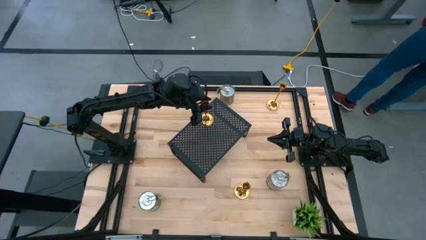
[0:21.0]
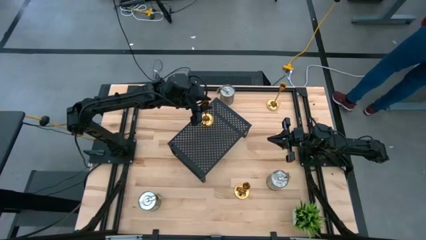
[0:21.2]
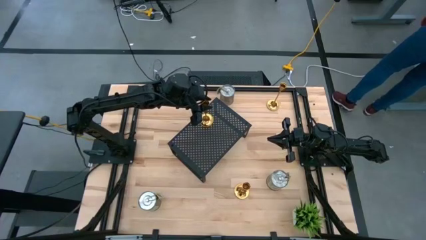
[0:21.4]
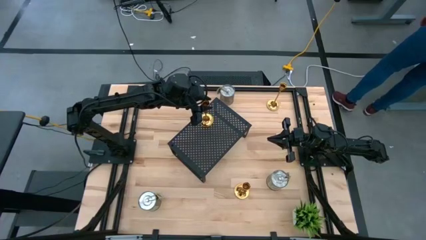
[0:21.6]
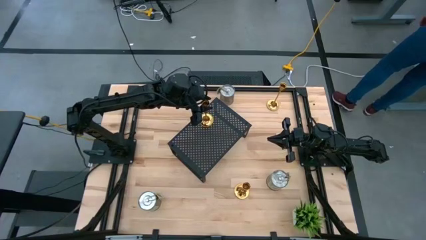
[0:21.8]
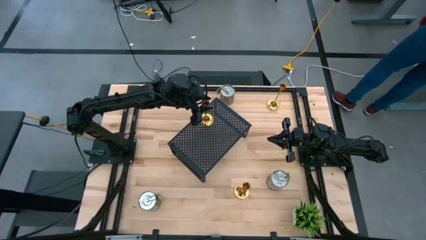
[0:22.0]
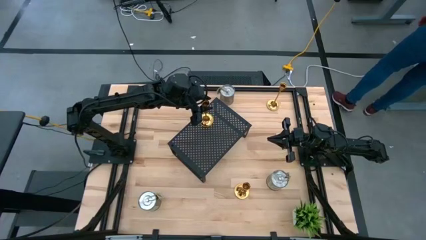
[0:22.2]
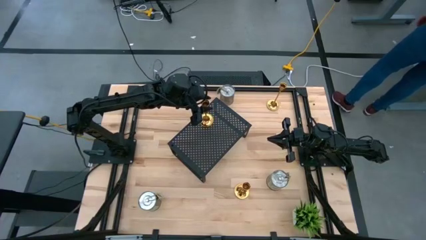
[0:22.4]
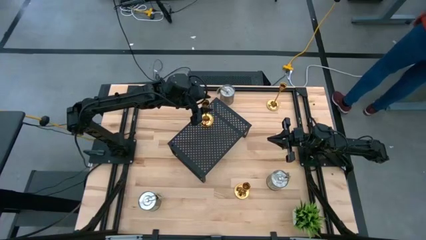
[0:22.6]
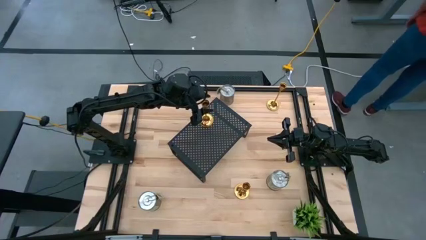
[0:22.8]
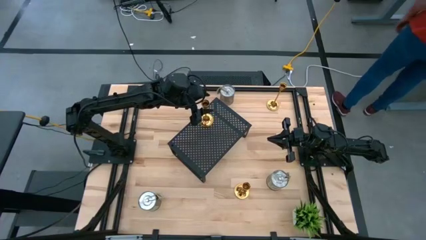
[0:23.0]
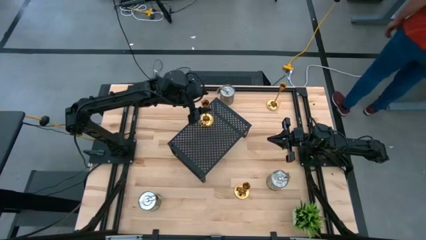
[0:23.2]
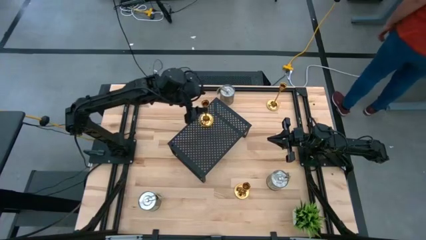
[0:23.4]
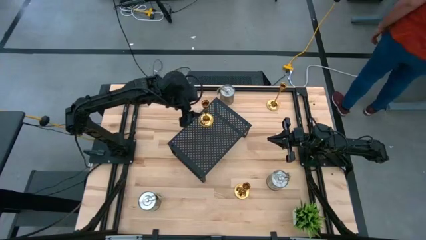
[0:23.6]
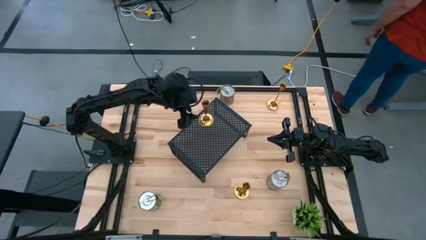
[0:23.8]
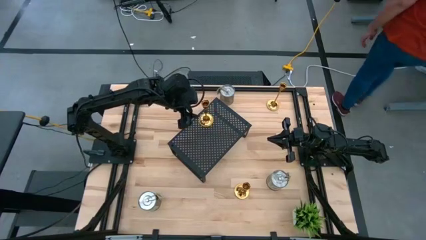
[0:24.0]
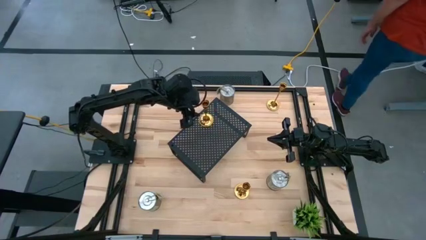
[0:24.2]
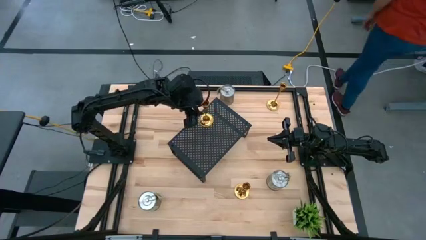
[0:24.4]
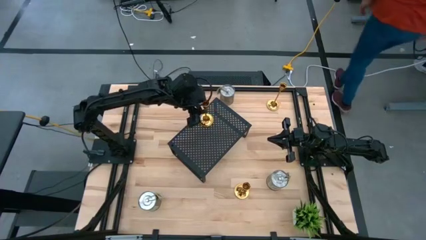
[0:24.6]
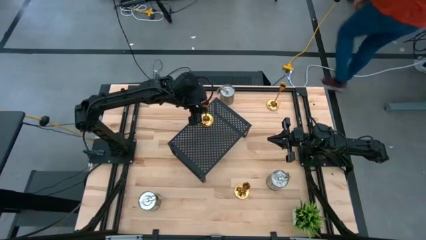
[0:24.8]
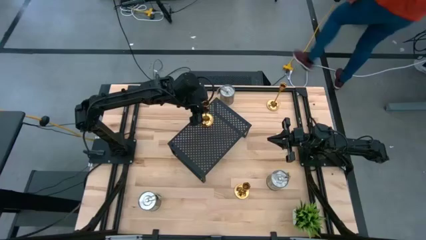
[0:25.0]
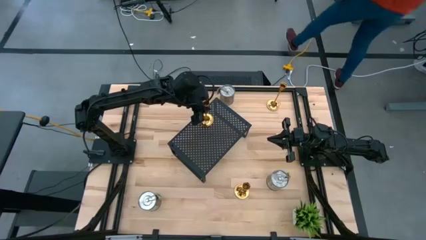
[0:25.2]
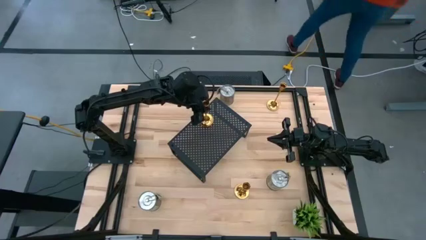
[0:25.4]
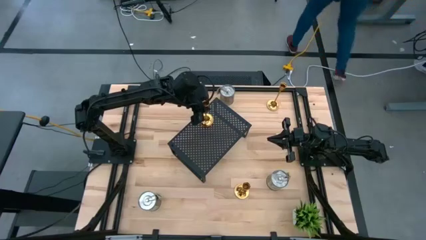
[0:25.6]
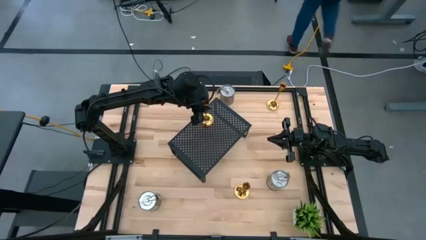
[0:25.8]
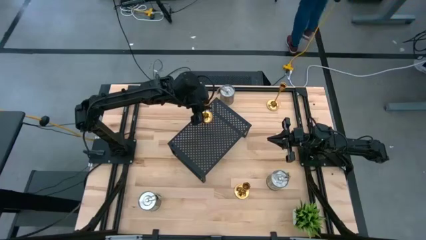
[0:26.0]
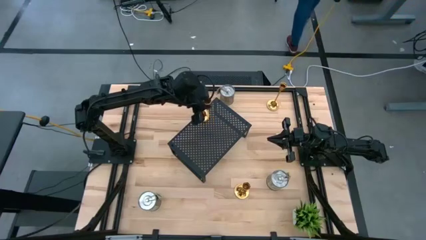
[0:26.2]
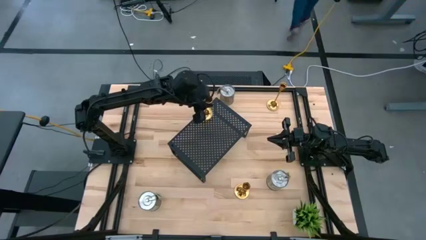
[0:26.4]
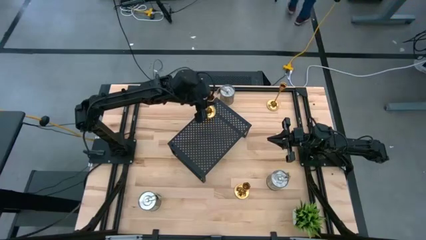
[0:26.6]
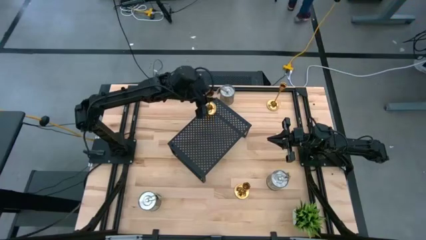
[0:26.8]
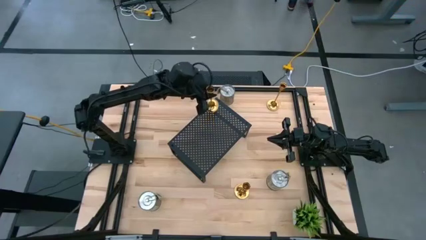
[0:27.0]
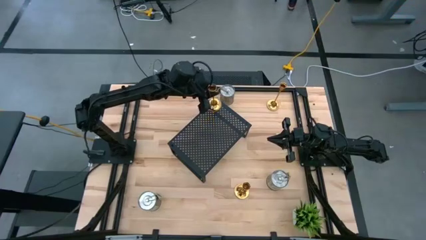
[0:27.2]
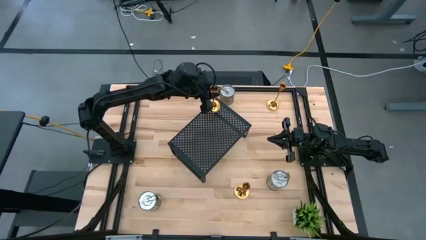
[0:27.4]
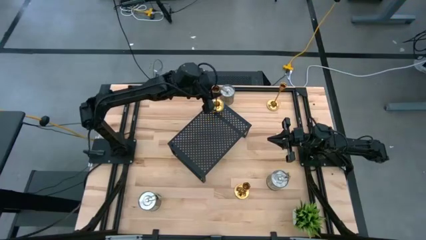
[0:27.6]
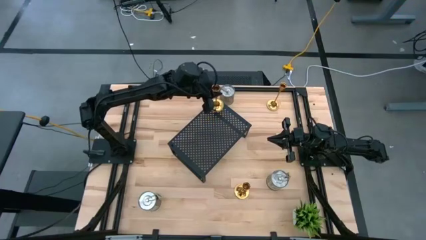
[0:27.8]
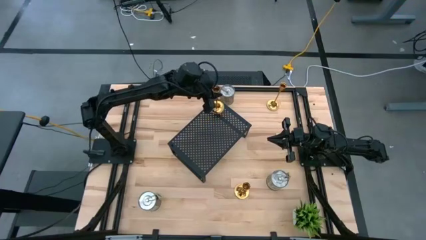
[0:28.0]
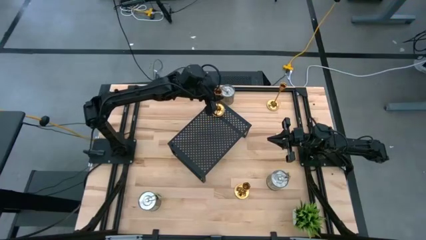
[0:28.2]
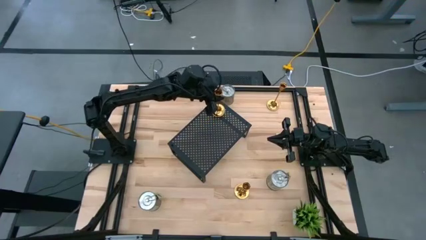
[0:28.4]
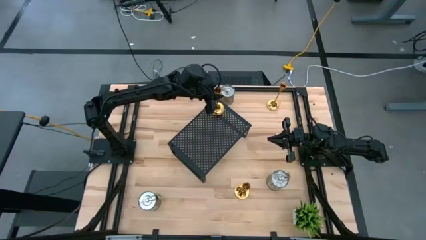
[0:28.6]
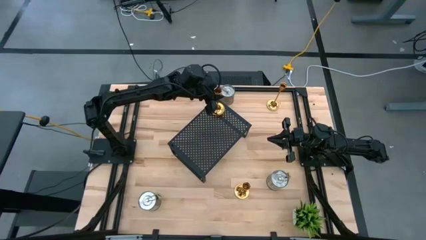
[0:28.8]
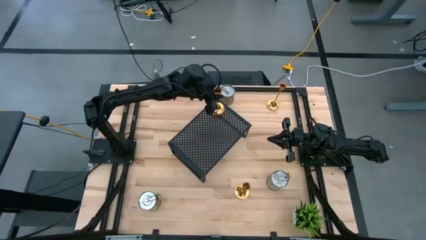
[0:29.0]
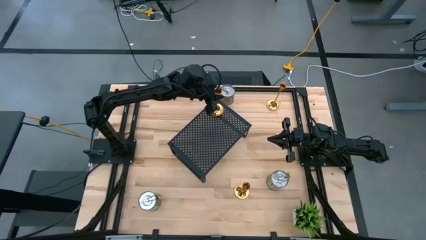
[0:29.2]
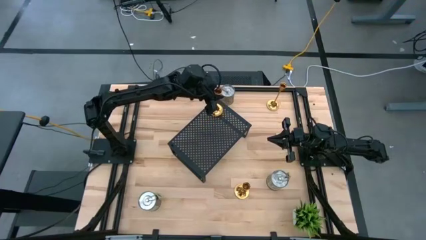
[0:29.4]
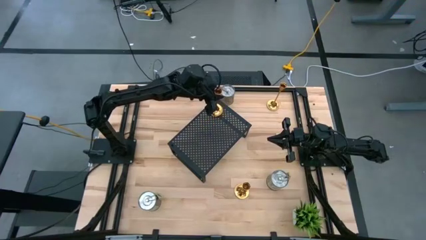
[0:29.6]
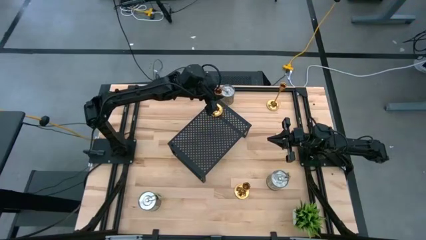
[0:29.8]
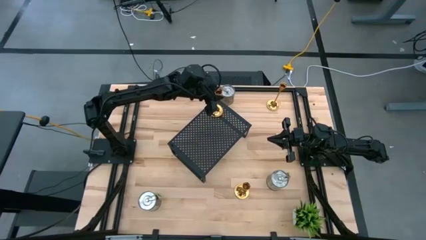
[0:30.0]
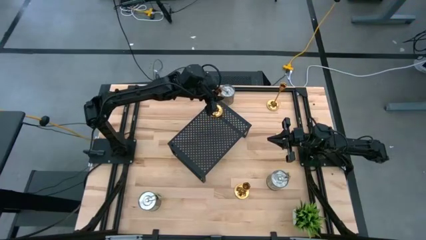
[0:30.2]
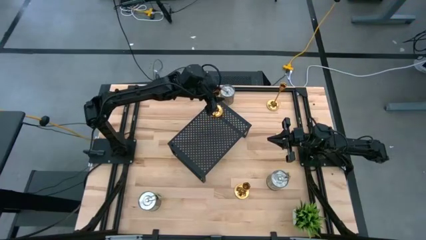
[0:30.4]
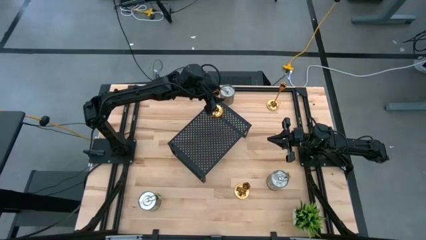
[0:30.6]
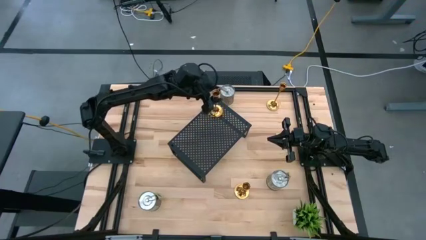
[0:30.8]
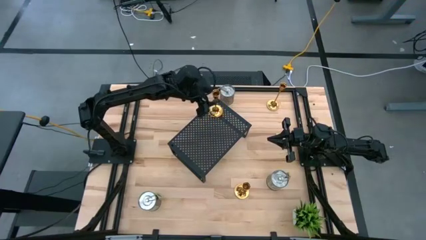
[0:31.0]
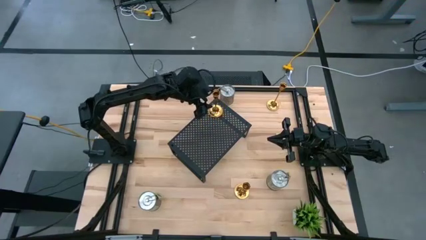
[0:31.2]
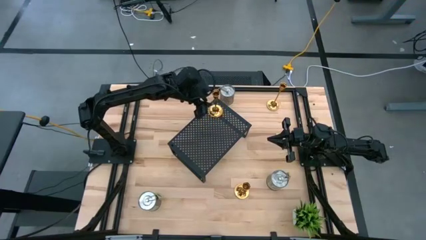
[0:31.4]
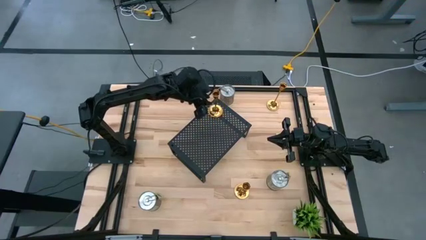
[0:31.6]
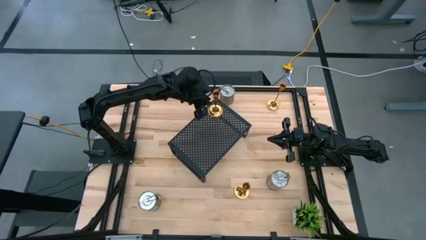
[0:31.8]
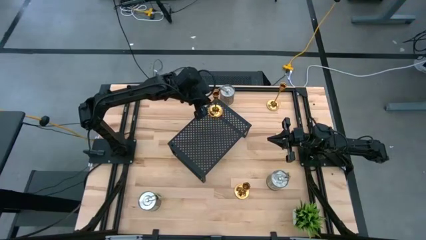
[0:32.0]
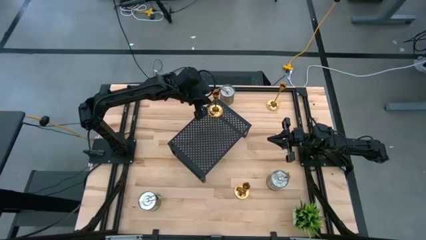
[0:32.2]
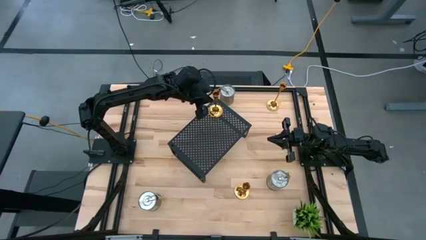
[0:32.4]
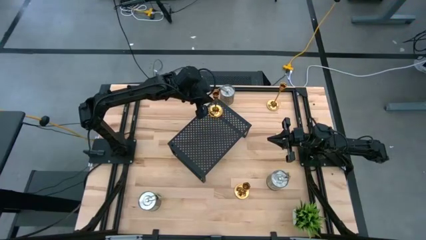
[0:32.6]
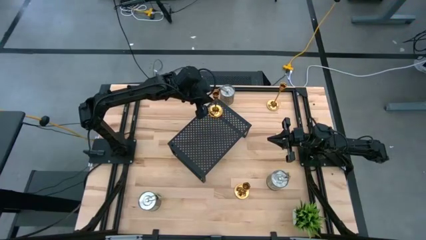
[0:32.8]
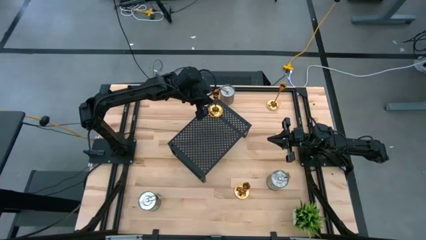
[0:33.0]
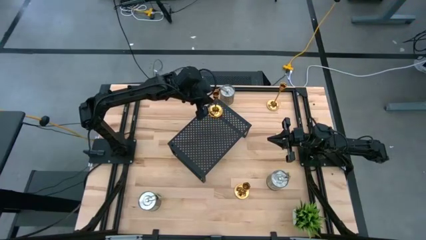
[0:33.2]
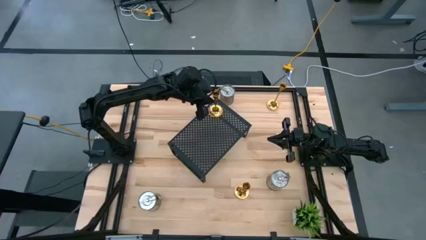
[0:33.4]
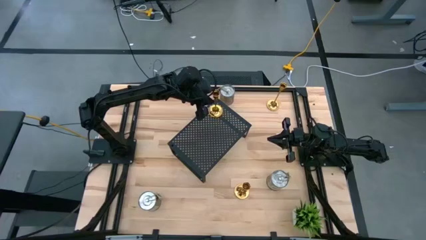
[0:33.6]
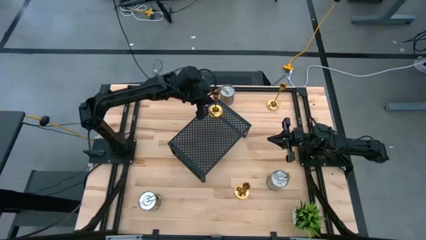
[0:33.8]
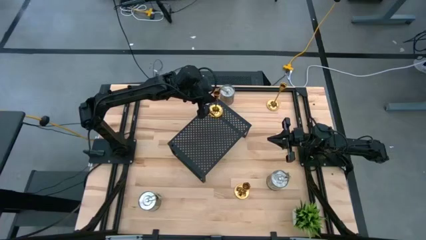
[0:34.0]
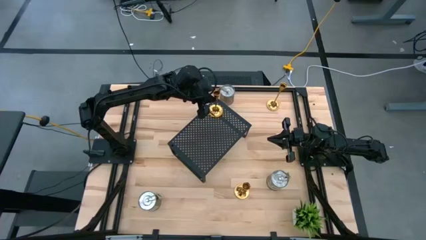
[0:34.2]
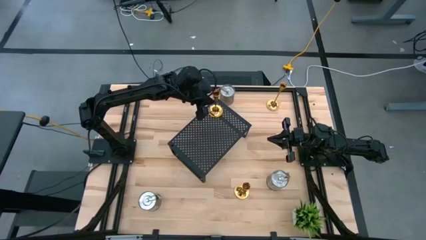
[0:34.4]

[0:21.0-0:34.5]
Task: Pick & Place candle stick holders
Put the top left gold candle holder on the shelf
